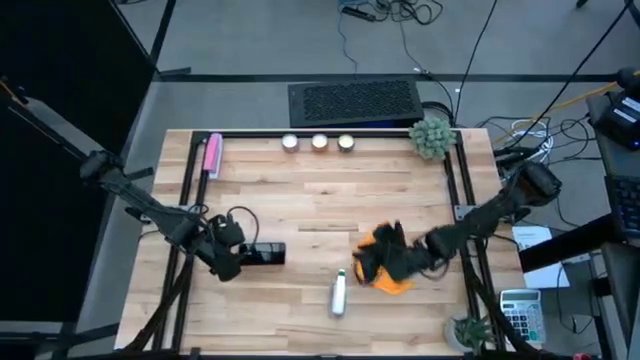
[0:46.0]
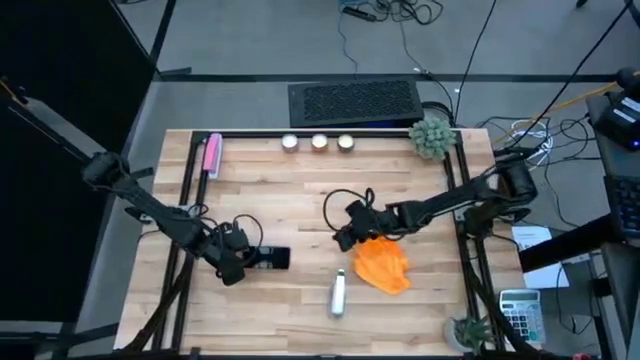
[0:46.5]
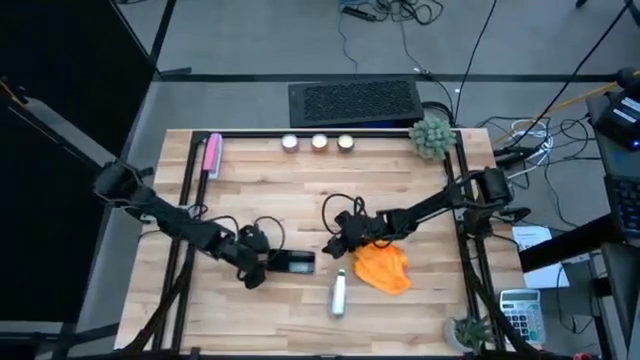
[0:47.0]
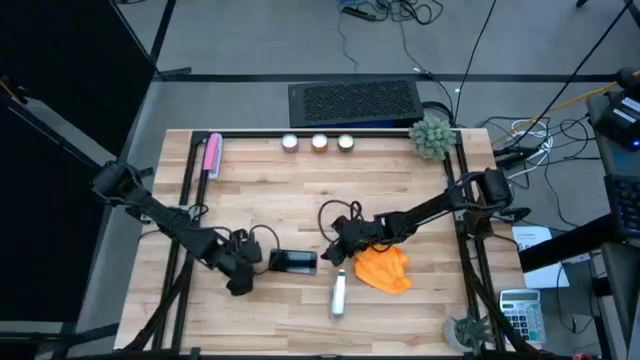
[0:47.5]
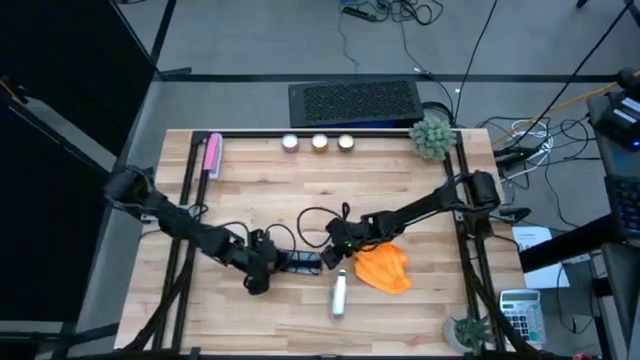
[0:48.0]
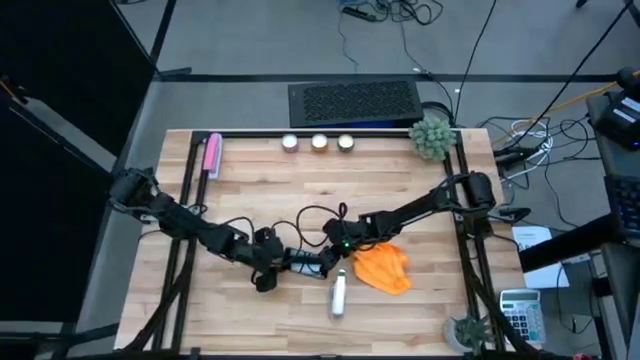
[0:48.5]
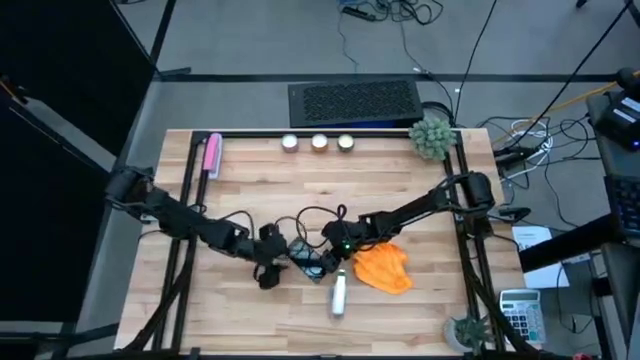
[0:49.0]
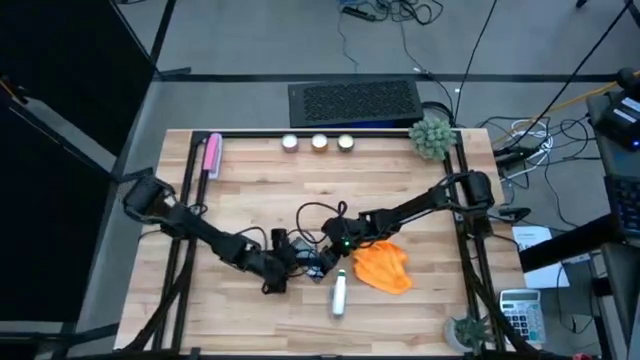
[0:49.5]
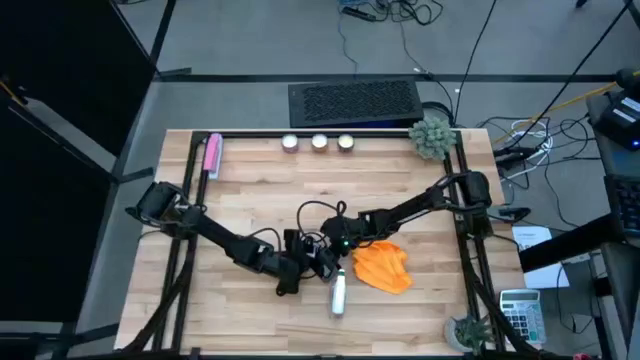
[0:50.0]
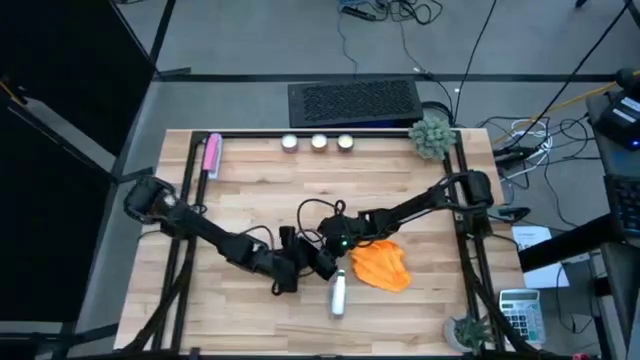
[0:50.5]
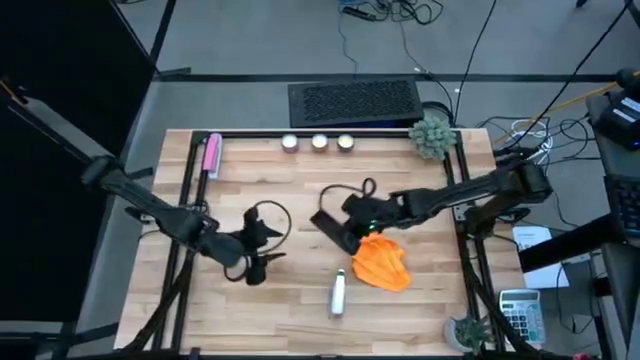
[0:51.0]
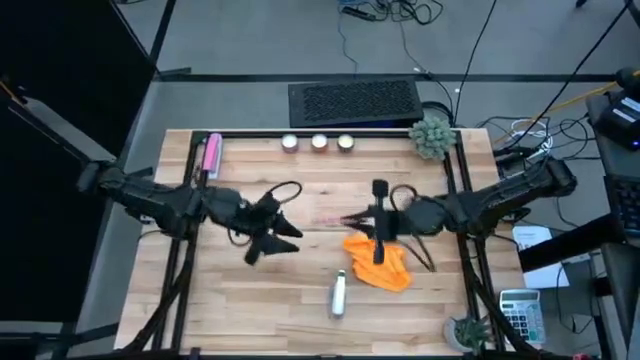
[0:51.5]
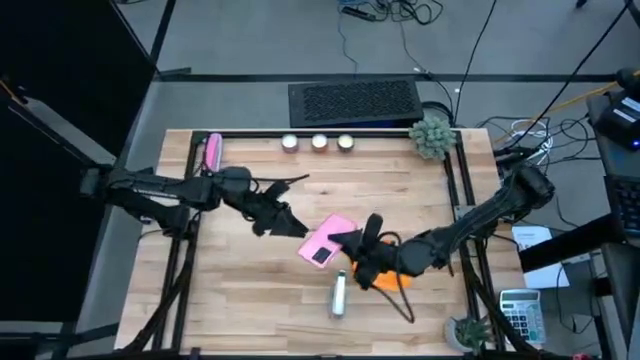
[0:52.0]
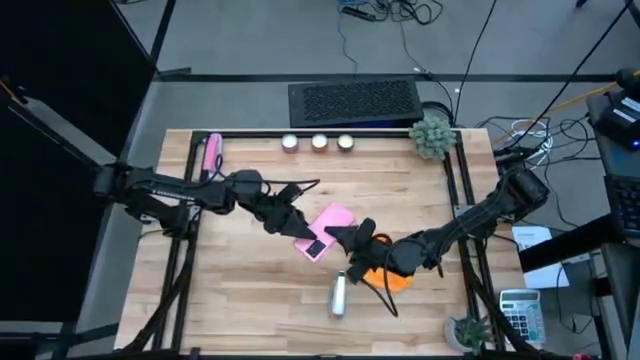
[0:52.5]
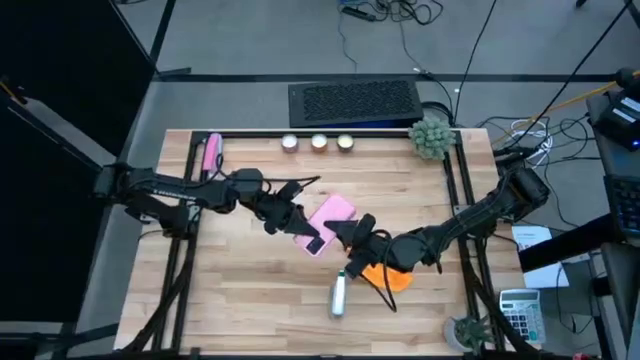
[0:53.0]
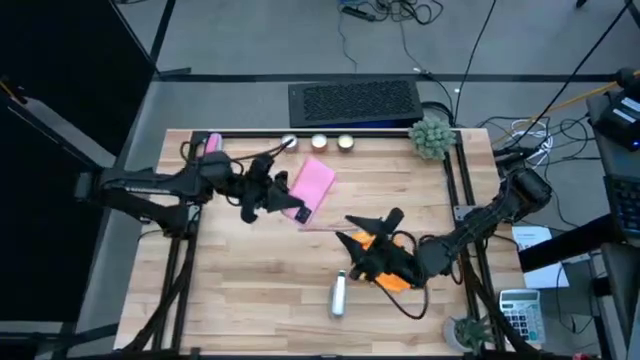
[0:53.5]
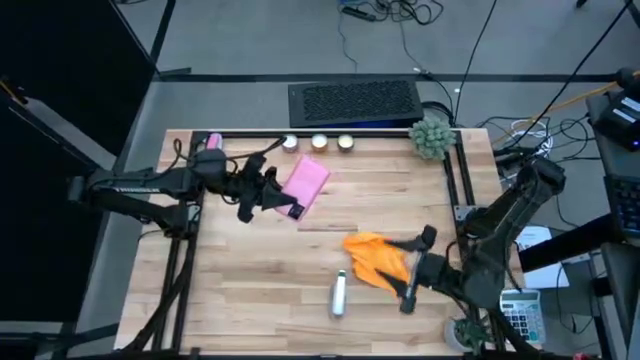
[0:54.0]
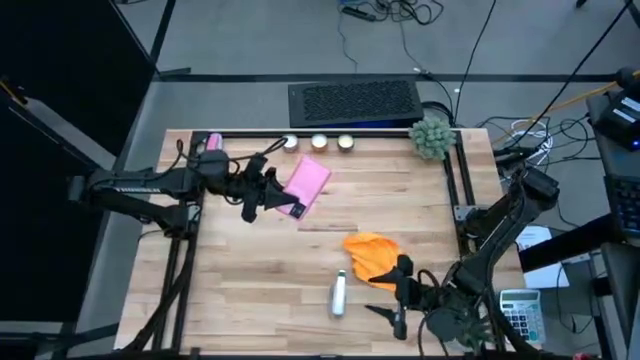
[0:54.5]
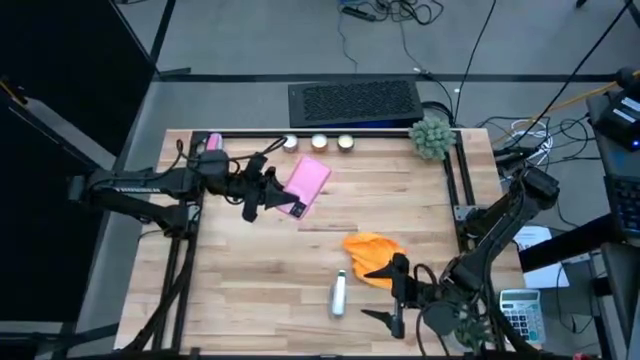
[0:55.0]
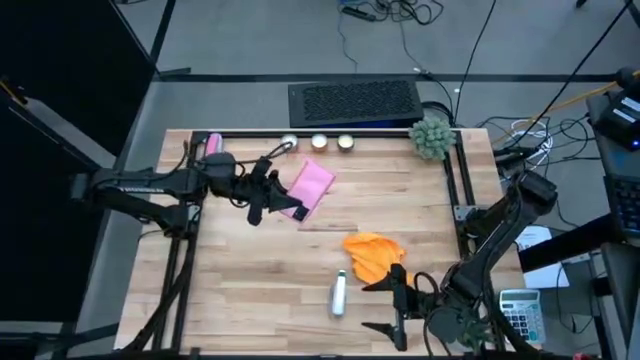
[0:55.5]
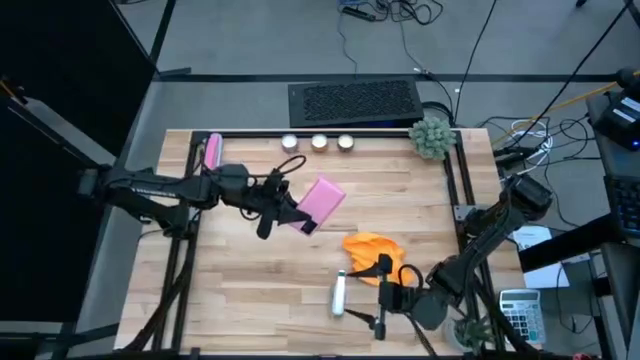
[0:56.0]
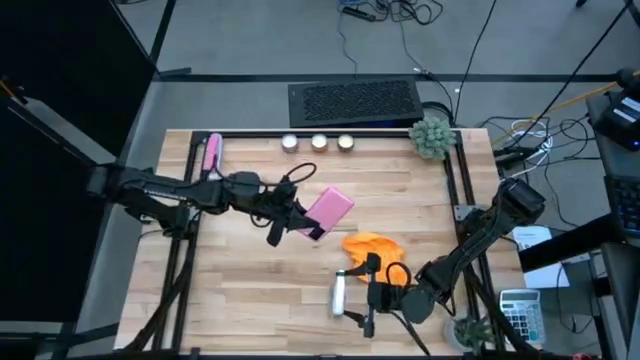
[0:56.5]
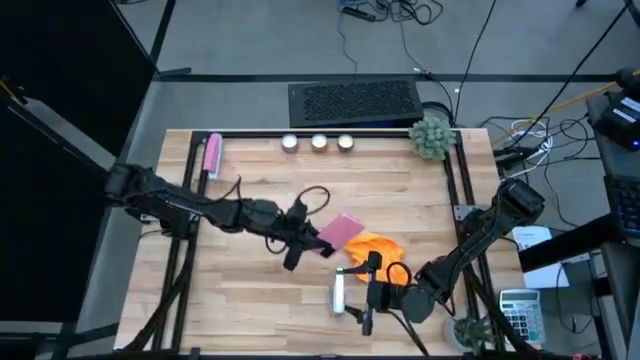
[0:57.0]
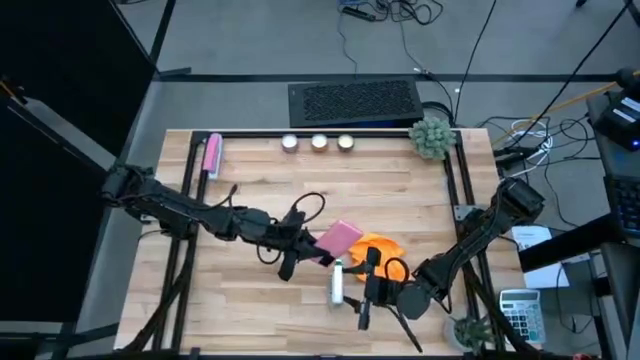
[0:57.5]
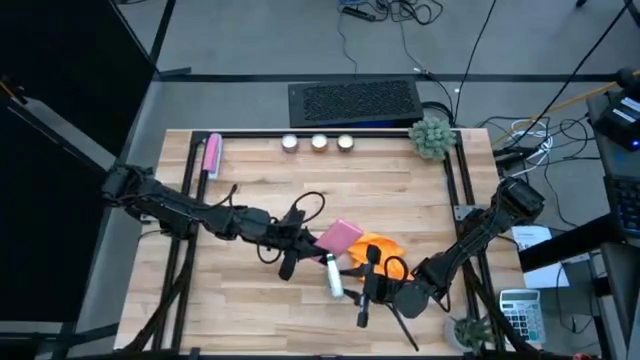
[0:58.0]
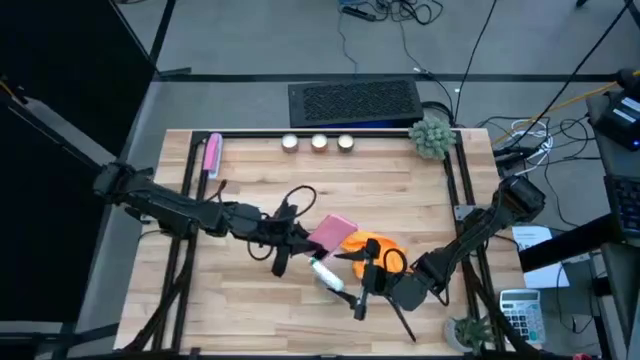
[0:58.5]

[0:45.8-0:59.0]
Task: Apply microfiber cloth
Spray the back of the cellphone using the spray bottle

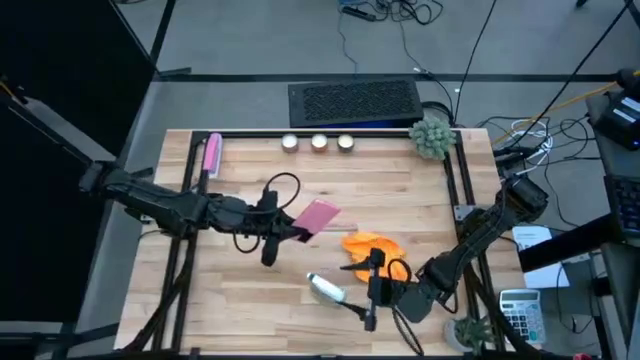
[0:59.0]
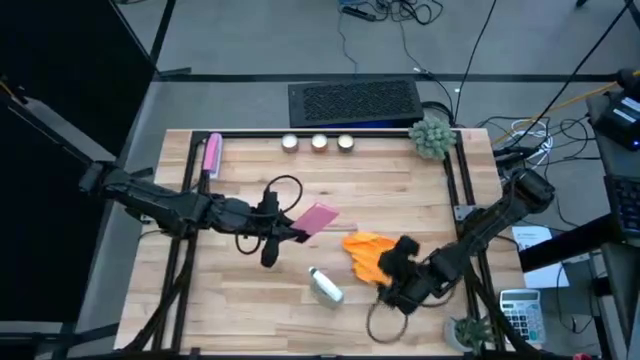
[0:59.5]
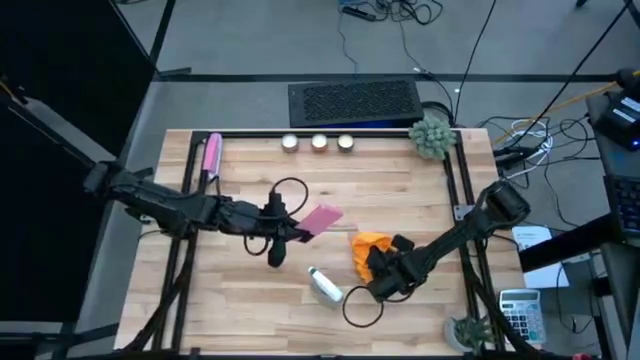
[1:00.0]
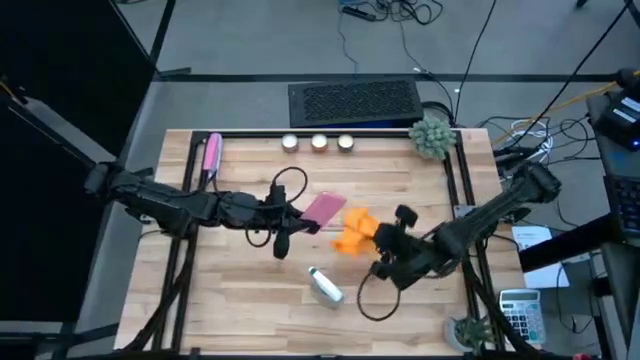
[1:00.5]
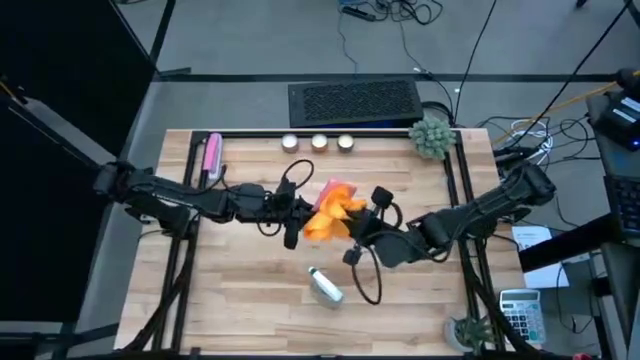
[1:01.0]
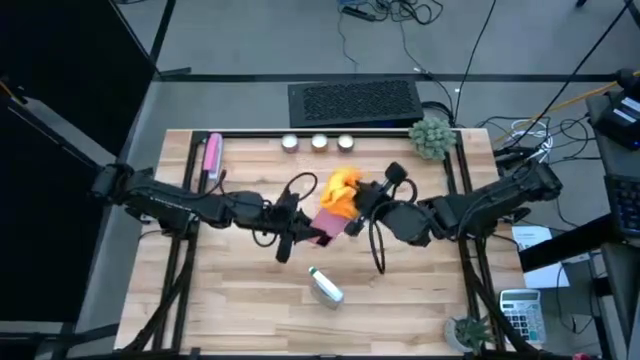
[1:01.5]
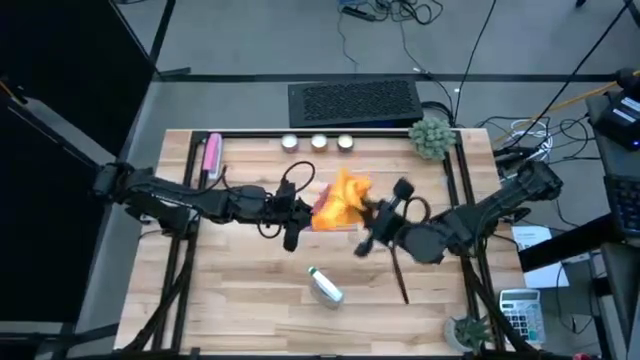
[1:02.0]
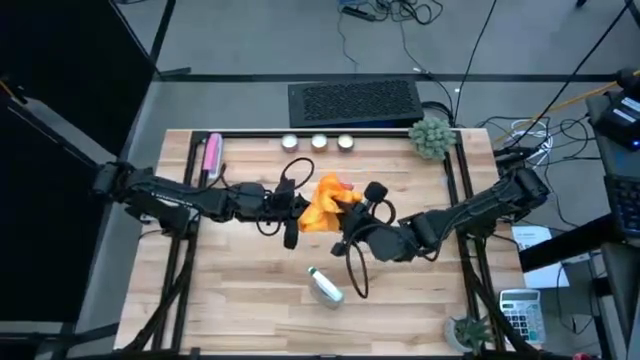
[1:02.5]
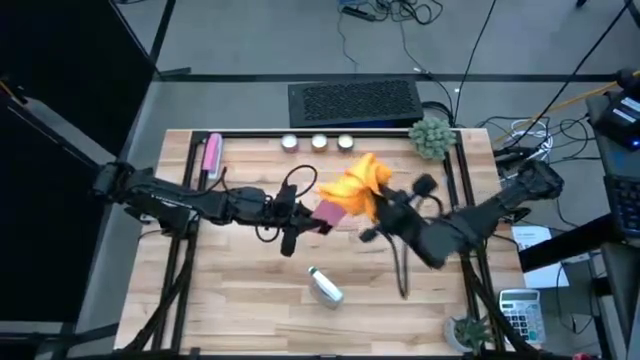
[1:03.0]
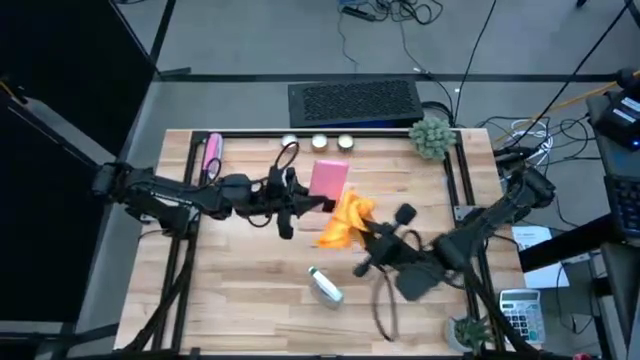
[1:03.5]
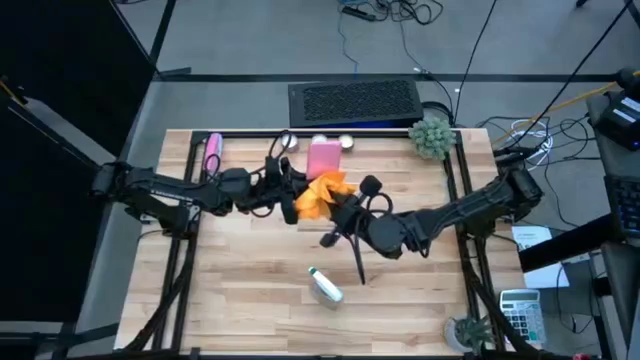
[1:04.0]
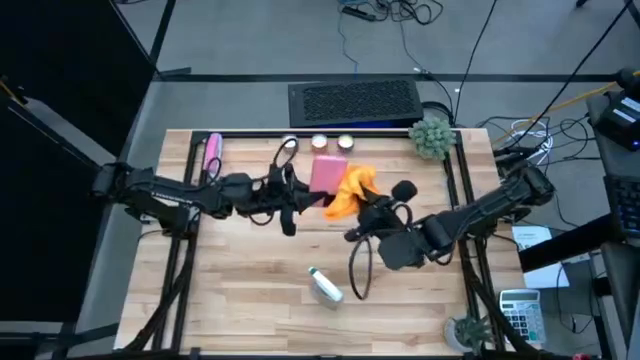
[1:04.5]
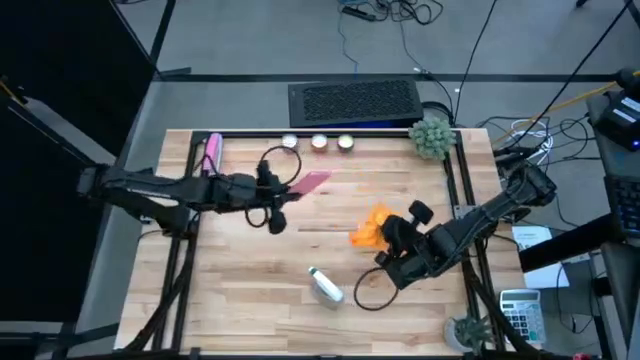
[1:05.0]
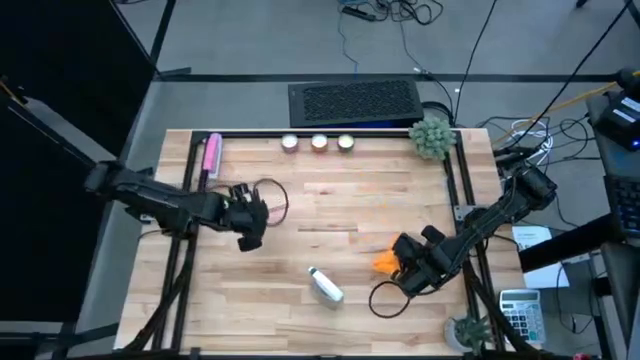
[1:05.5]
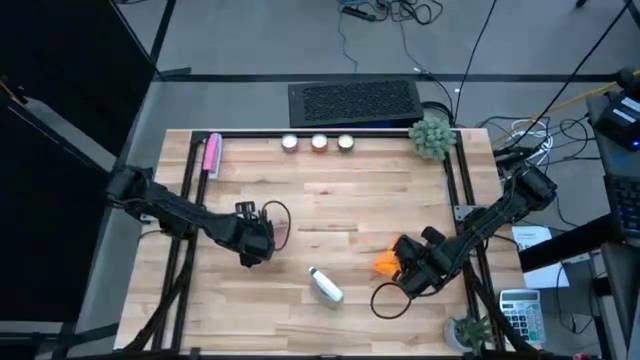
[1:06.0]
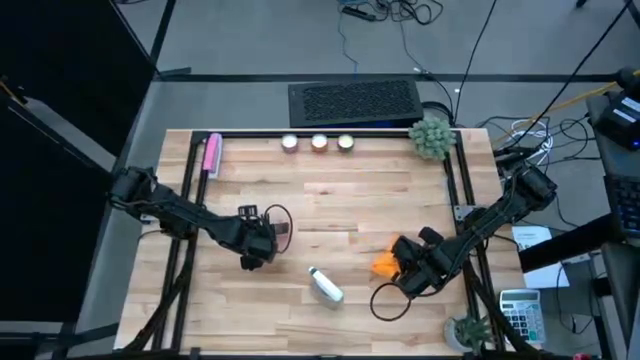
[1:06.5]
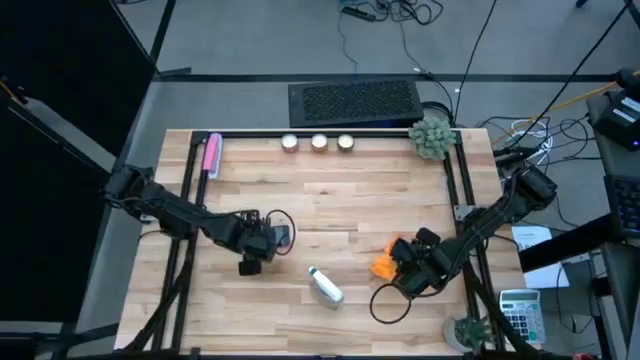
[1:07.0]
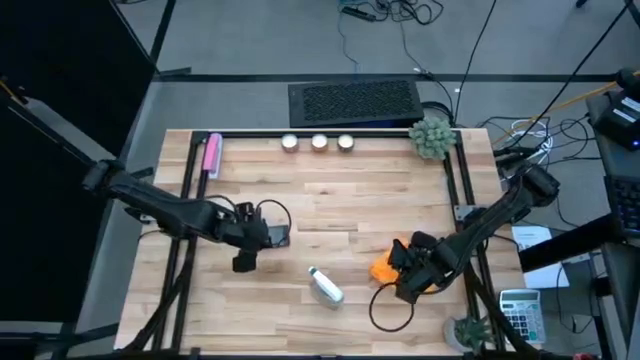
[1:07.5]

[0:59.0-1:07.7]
Wipe the cellphone with a microfiber cloth
